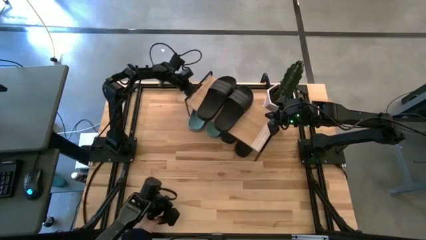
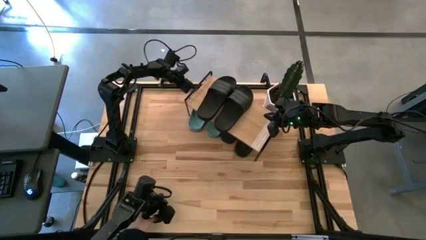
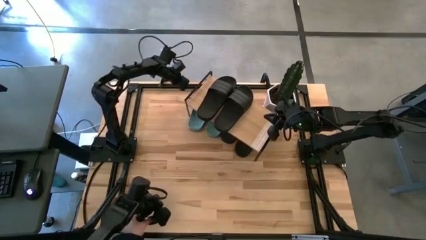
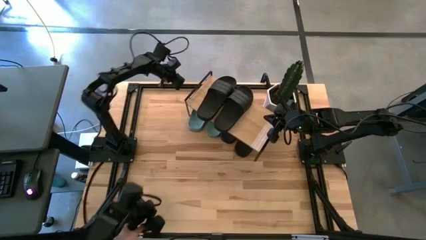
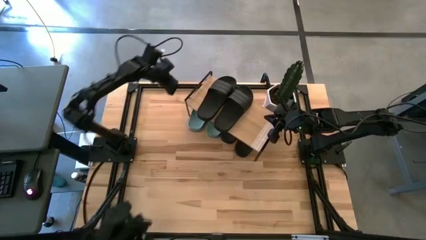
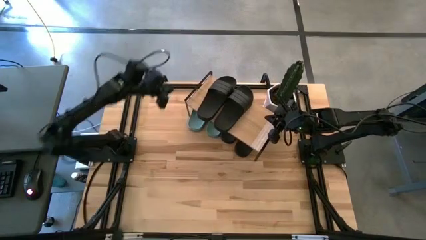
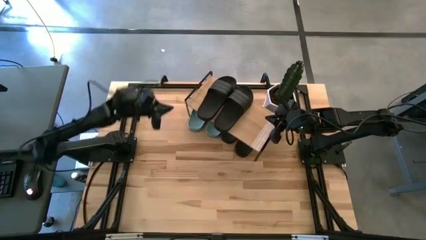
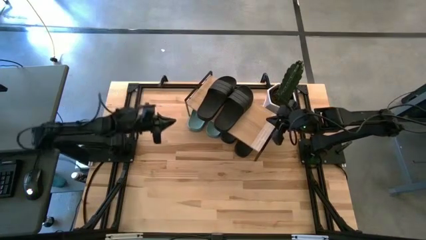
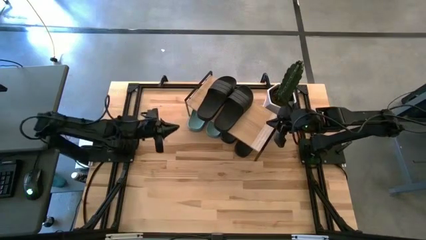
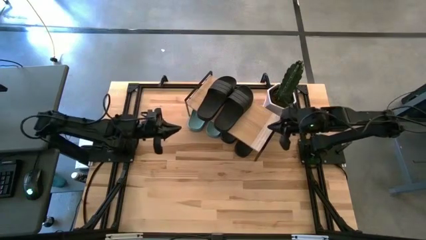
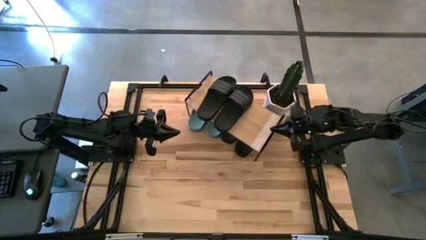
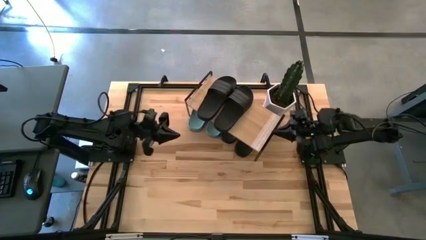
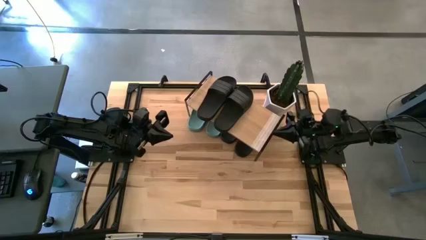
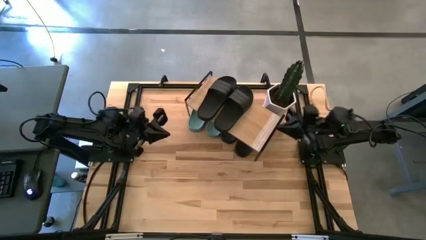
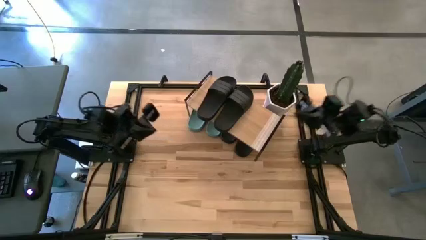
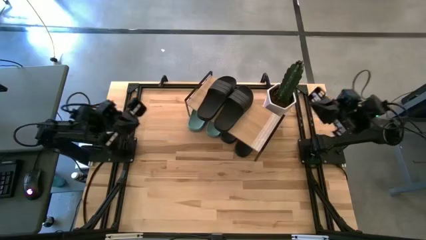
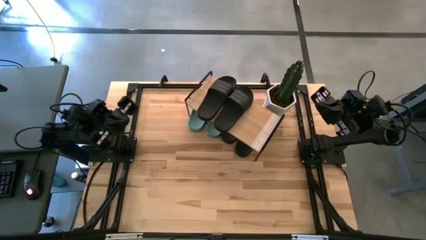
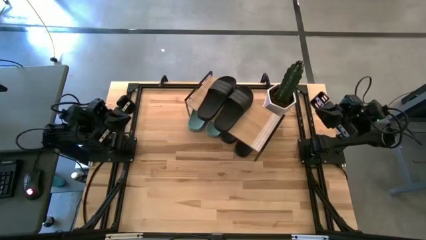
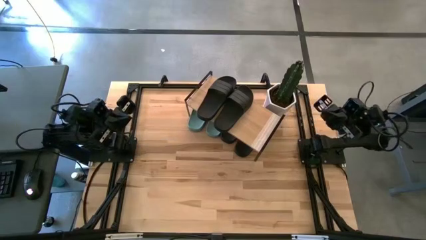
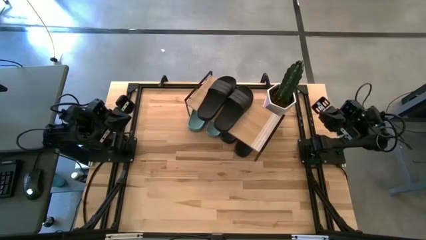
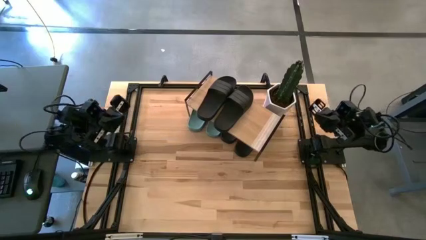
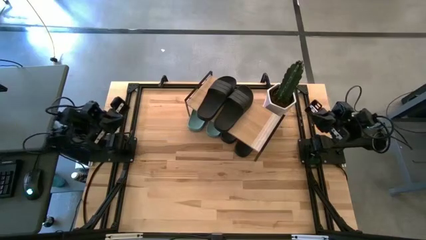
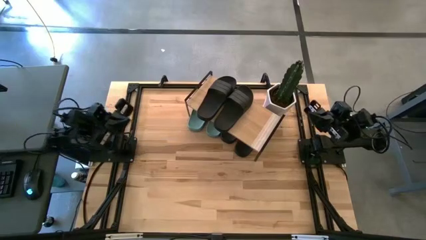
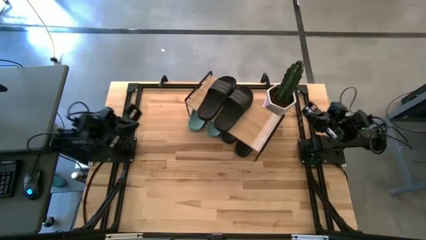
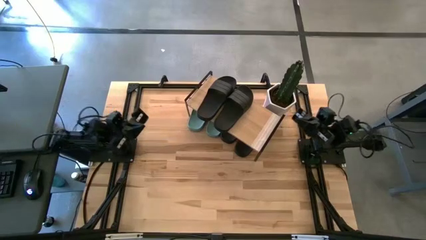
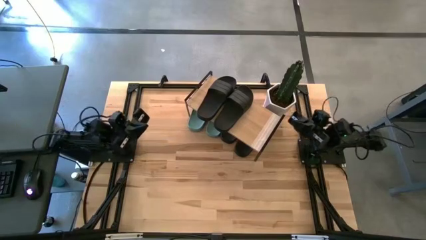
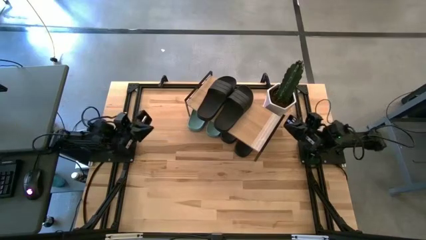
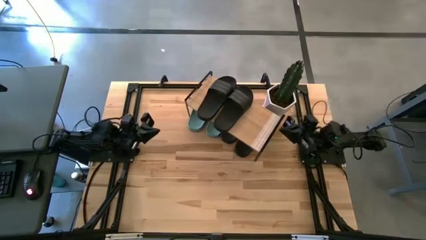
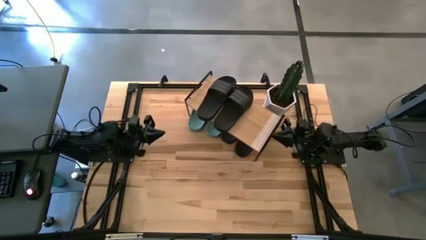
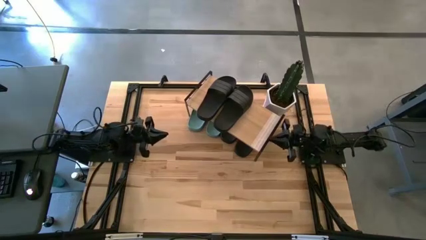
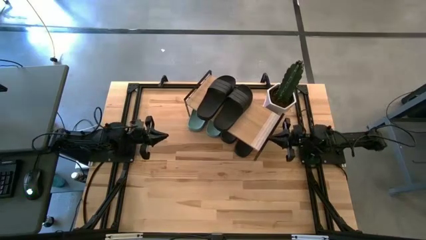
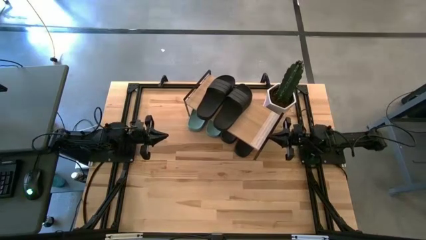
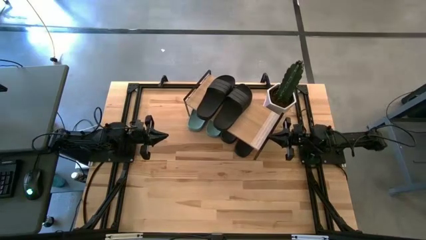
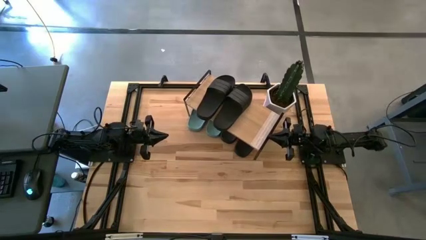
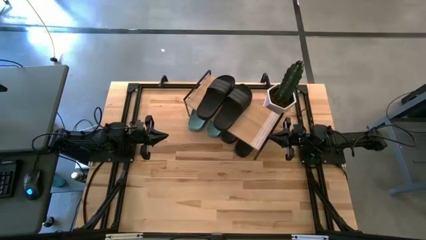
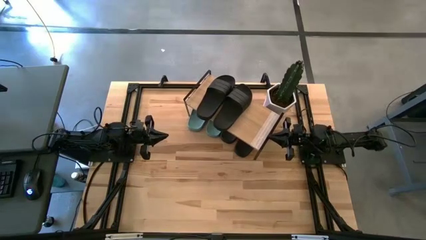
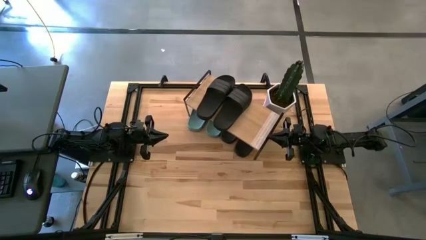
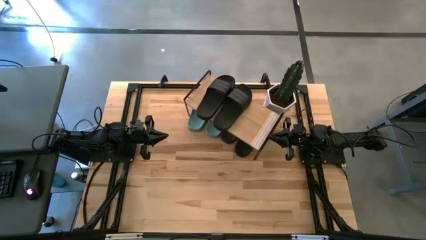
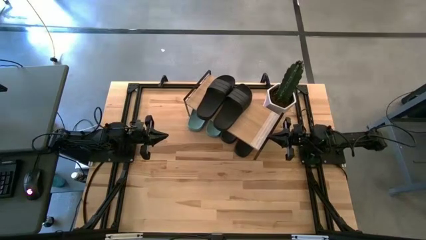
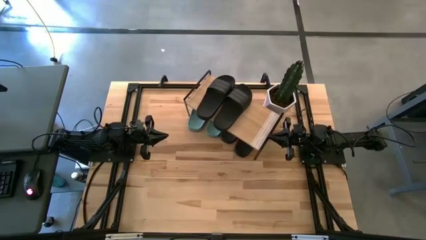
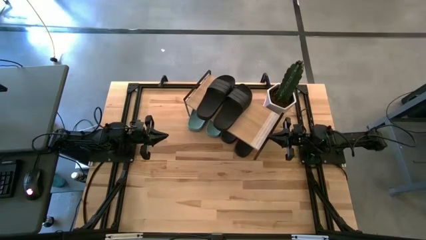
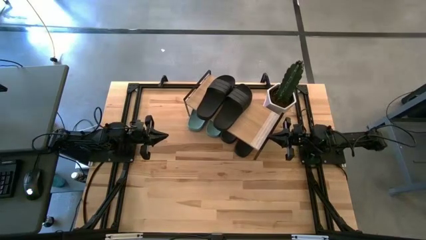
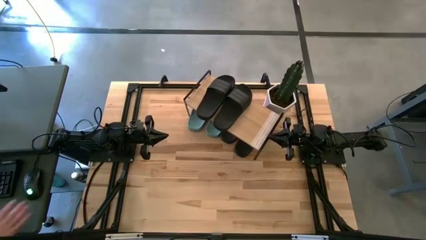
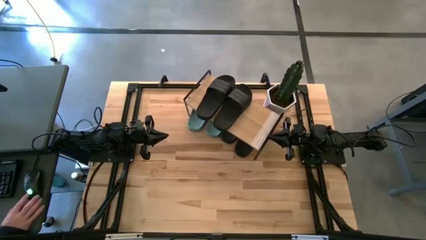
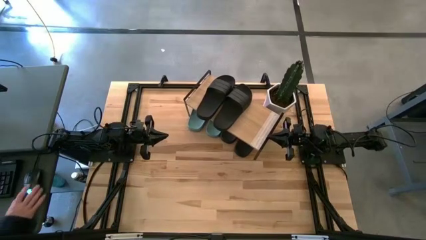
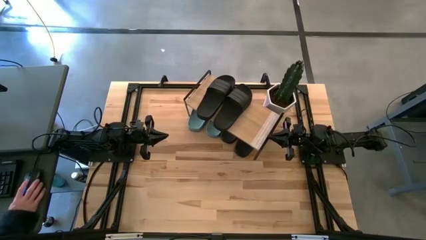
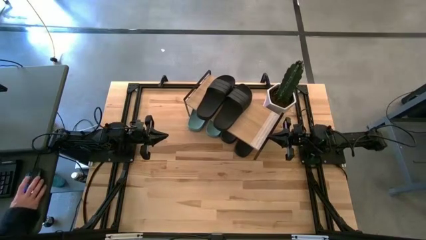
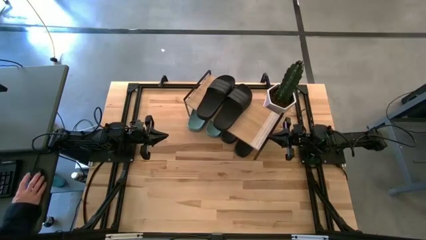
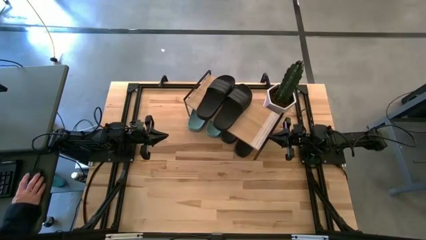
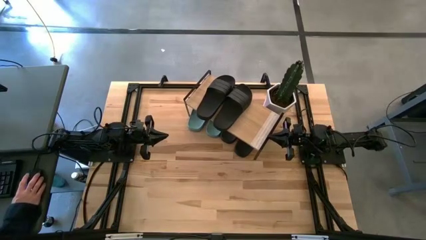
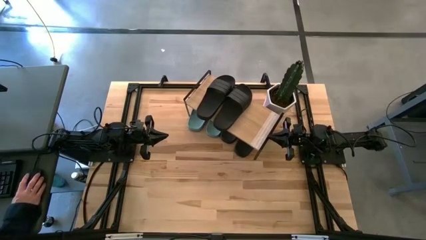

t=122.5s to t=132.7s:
Task: Pick and place slides into the shelf
Return to Home Position

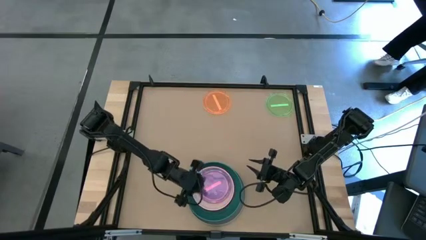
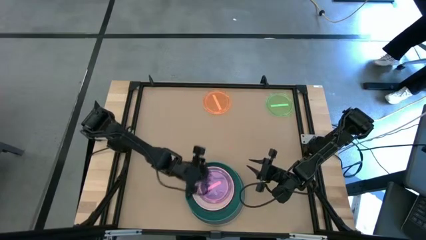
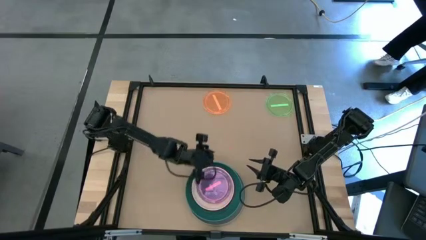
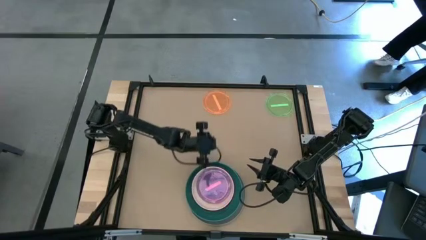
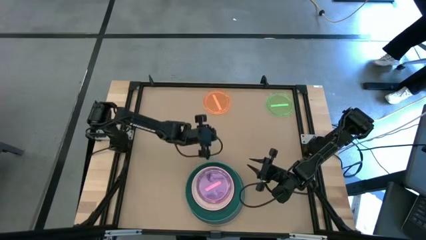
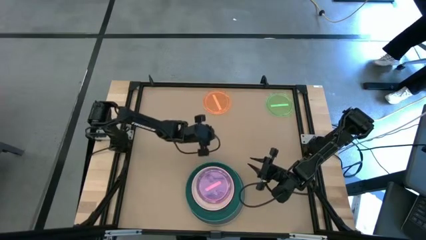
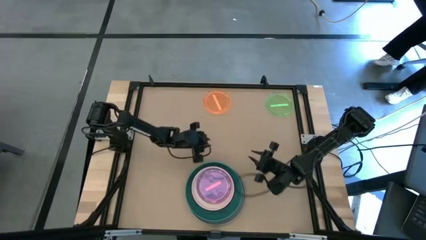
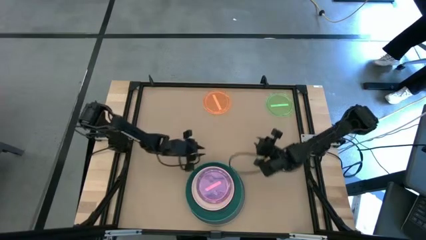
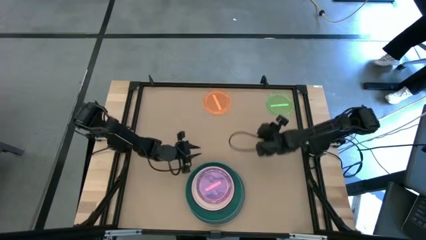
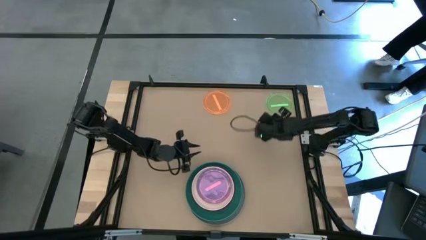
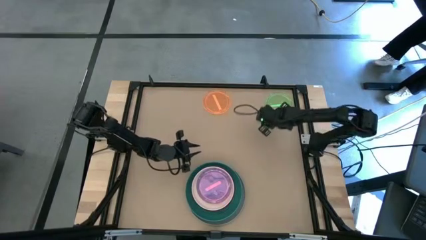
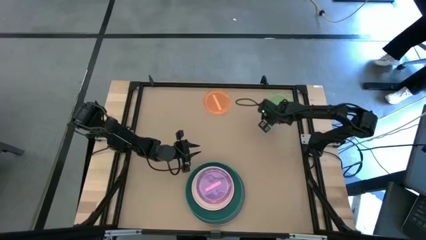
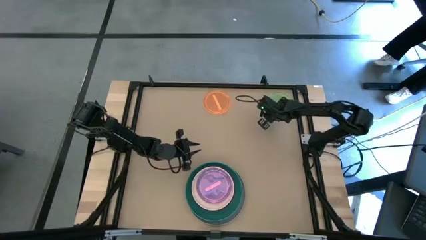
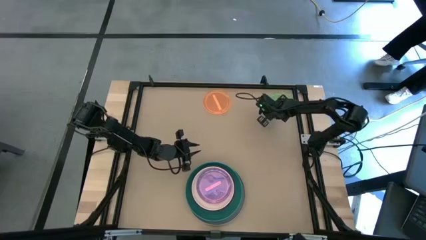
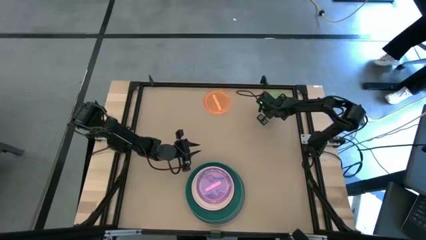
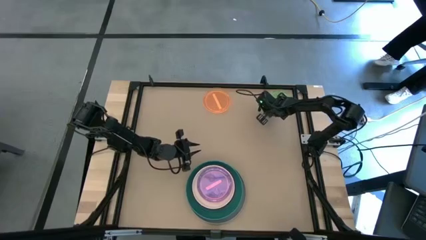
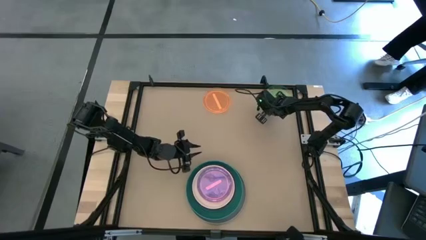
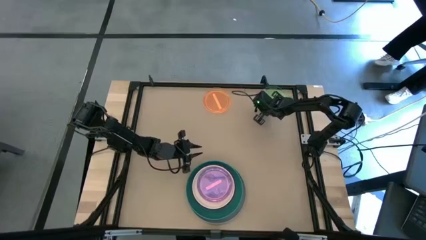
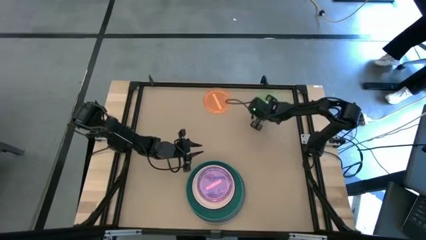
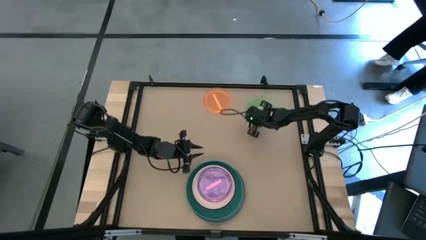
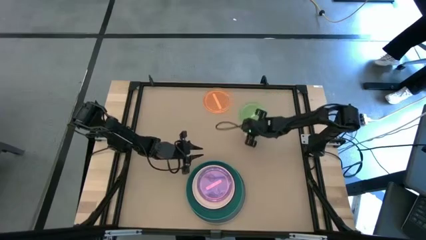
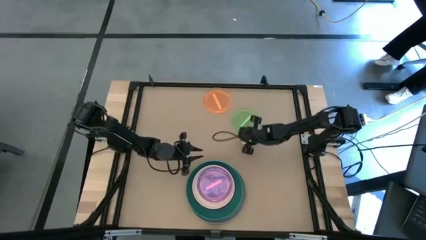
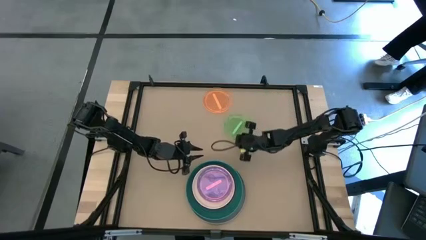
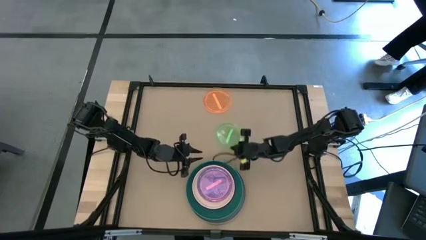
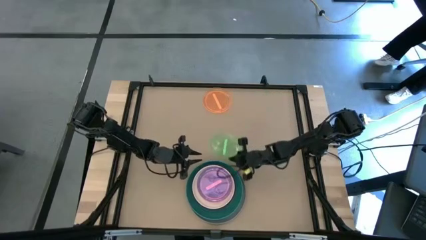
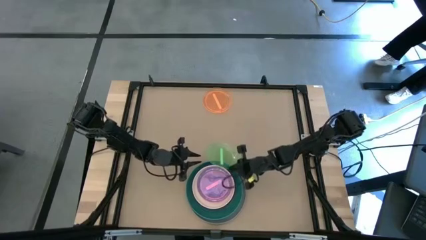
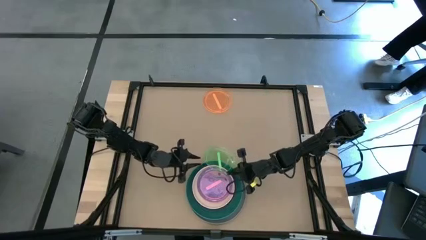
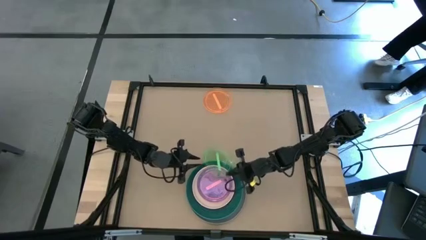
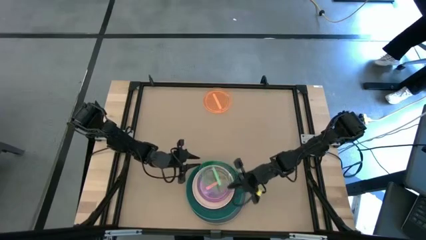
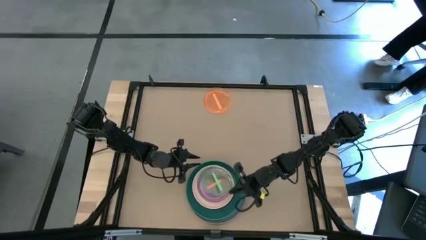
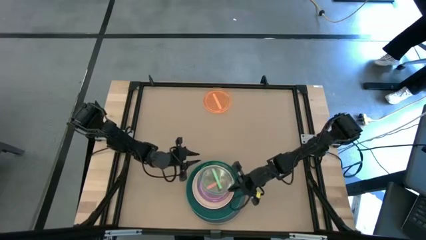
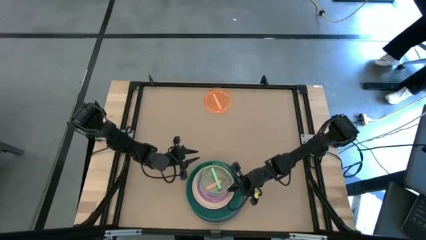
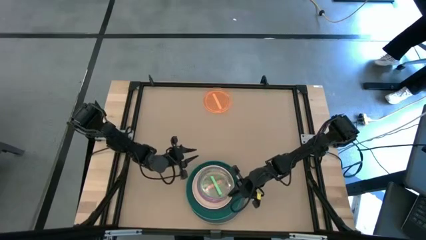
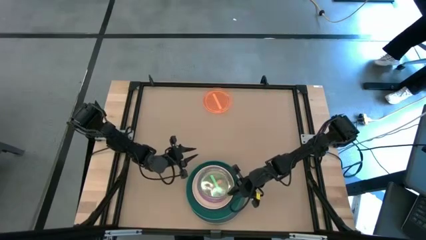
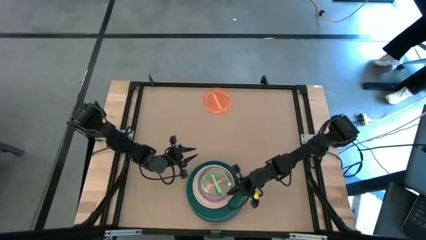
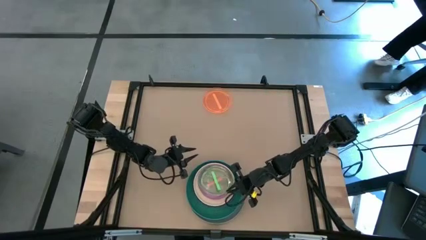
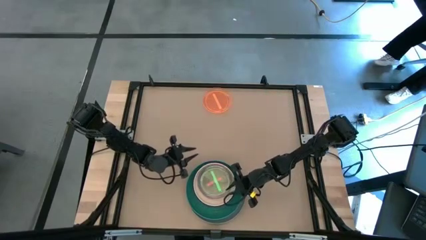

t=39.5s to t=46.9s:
Task: Stack plastic plates
Stack the green transparent plate on top of the pink transparent plate
